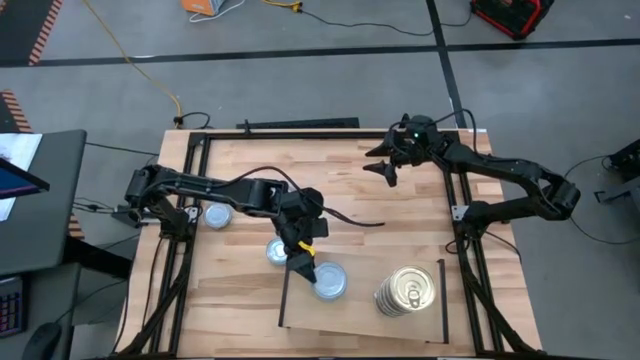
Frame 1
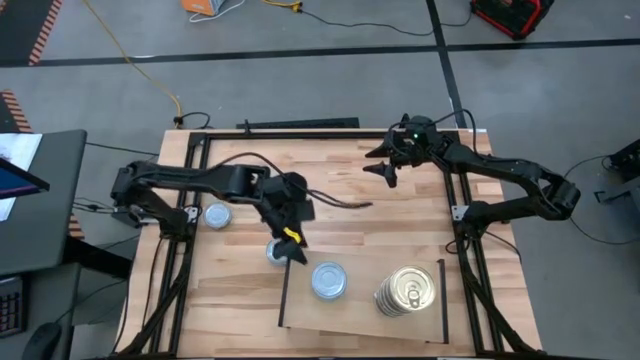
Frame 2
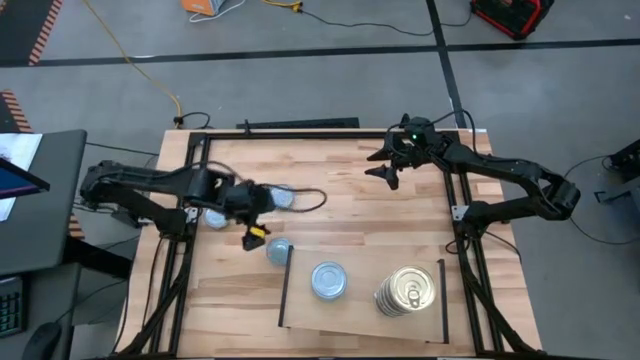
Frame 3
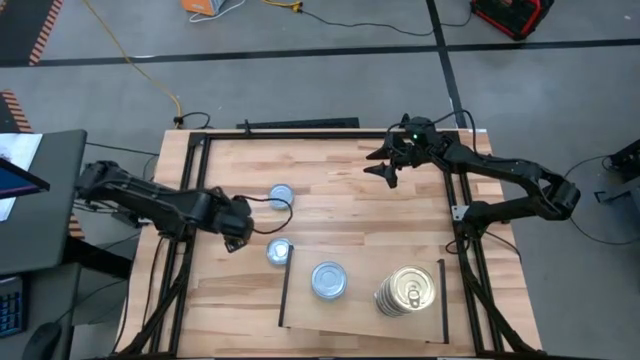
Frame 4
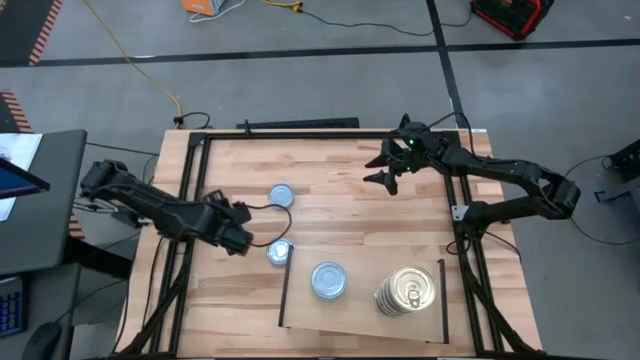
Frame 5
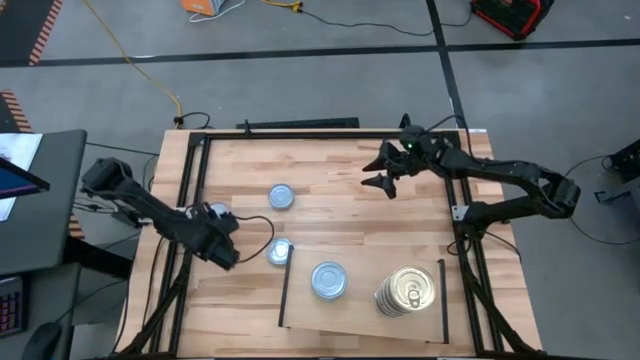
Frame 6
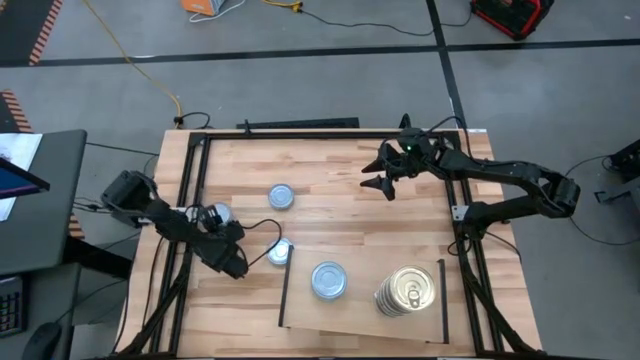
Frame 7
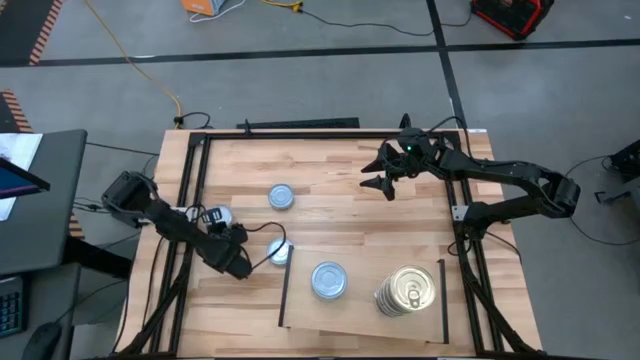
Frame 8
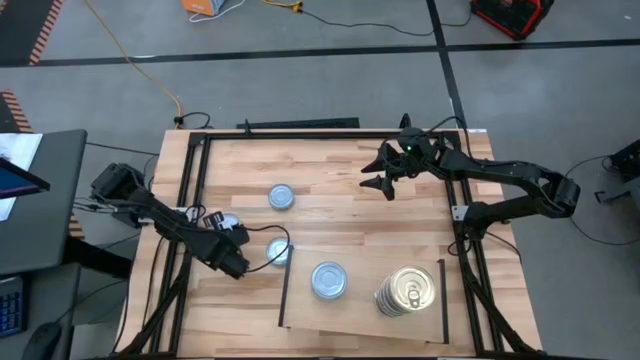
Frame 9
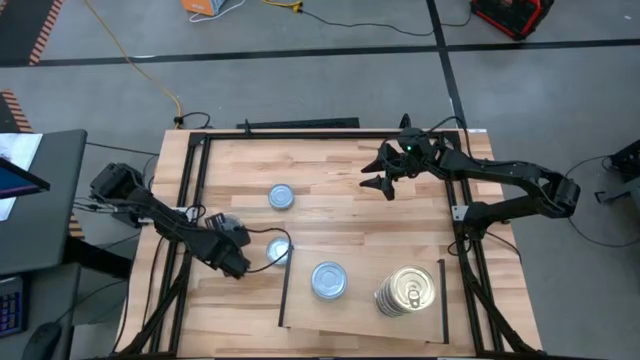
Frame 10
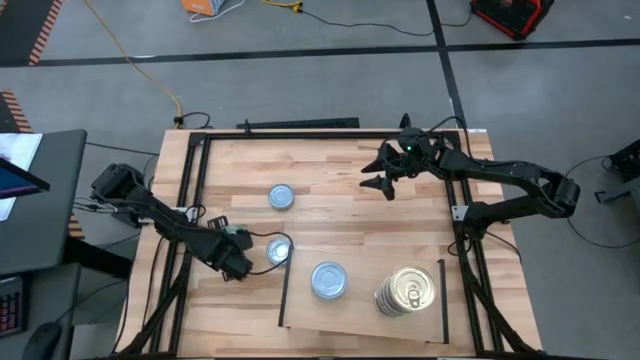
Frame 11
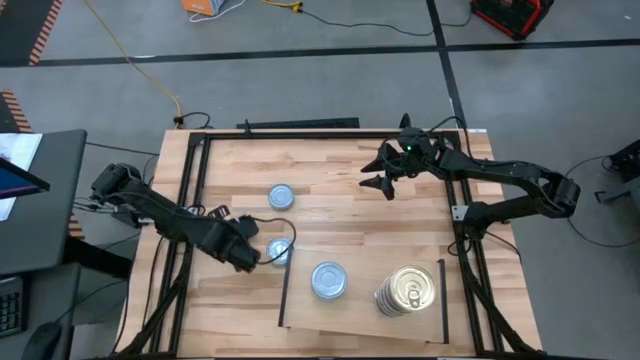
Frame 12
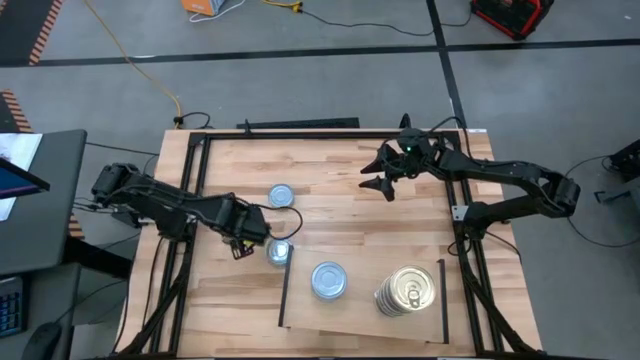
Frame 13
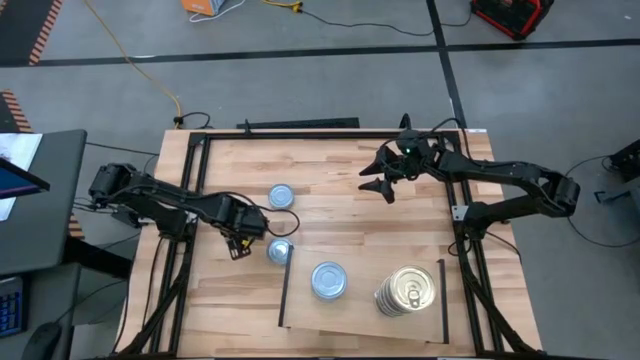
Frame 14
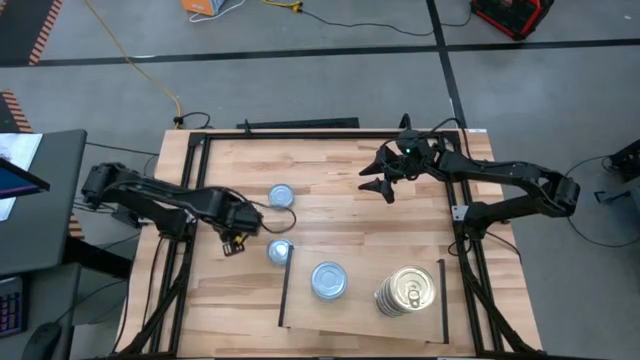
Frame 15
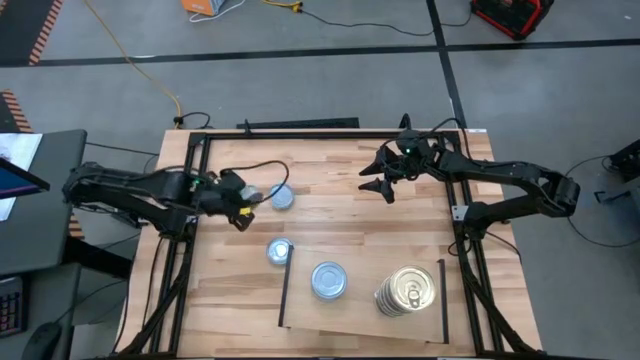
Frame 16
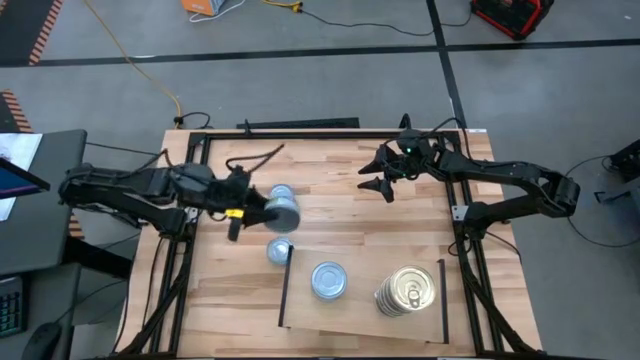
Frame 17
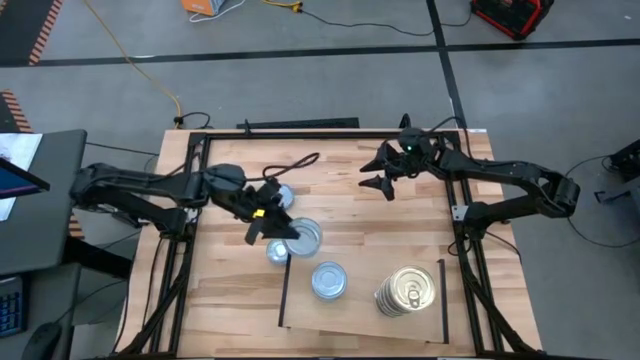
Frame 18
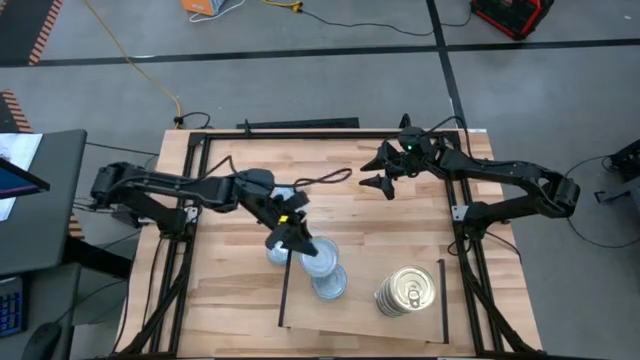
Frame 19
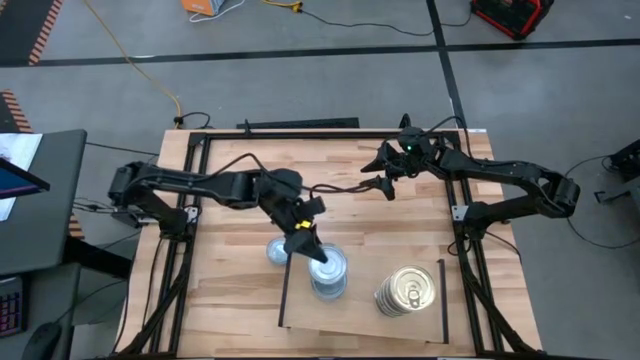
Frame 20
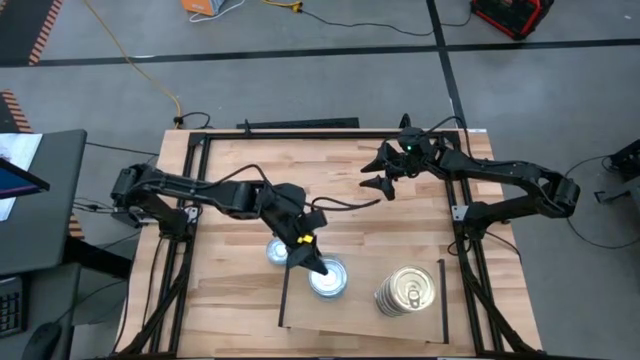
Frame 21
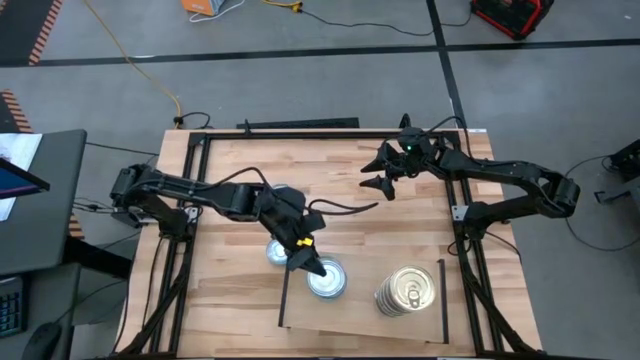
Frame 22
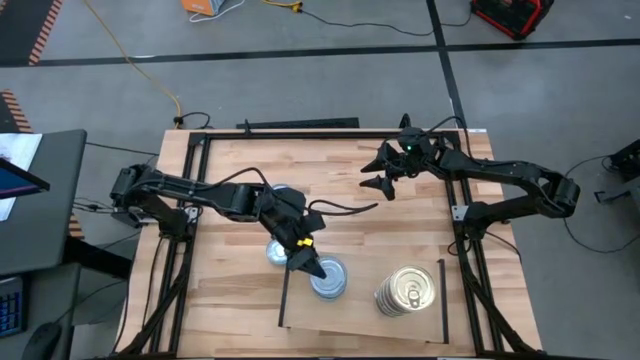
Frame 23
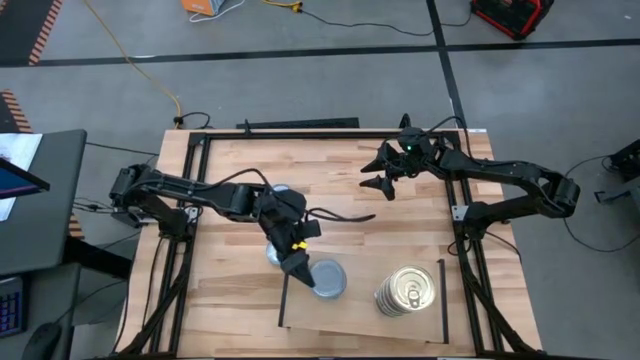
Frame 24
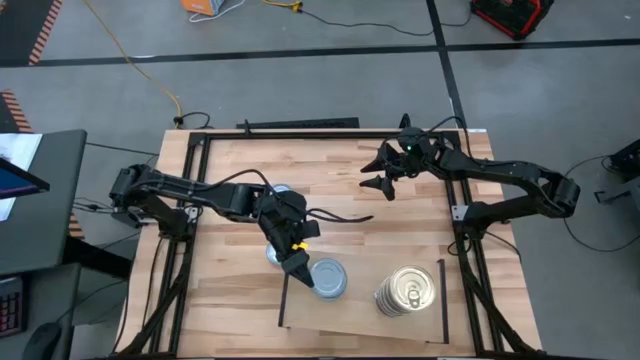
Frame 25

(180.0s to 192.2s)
Task: Stack canned seafood by type on shelf
Stack the green tuna can on the top of the green tuna cans on the shelf

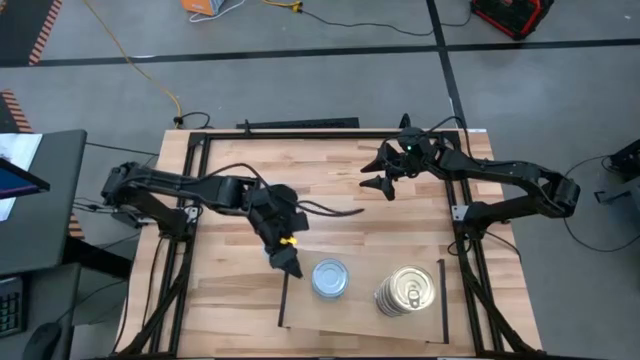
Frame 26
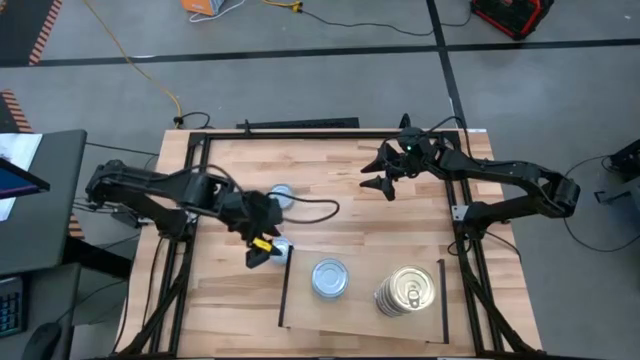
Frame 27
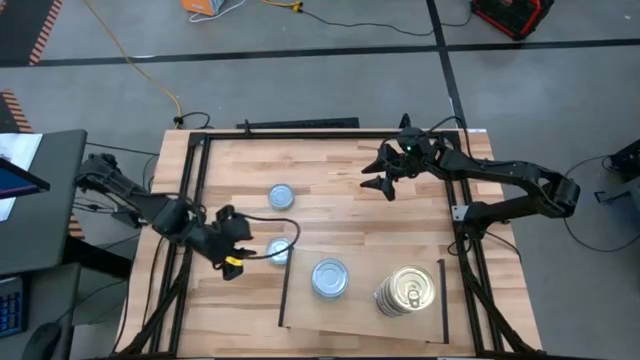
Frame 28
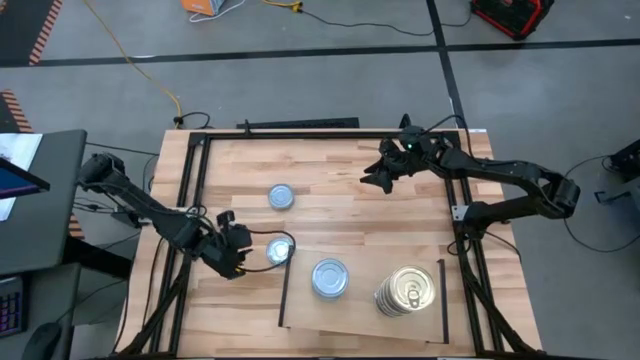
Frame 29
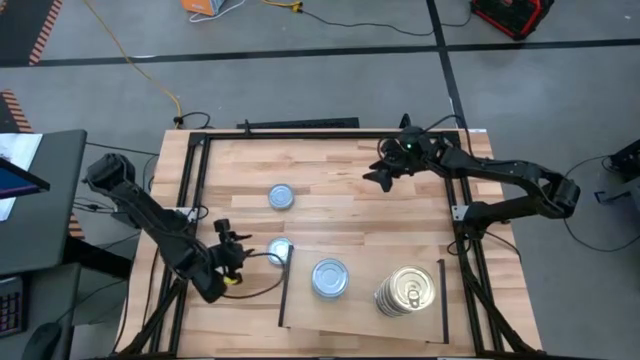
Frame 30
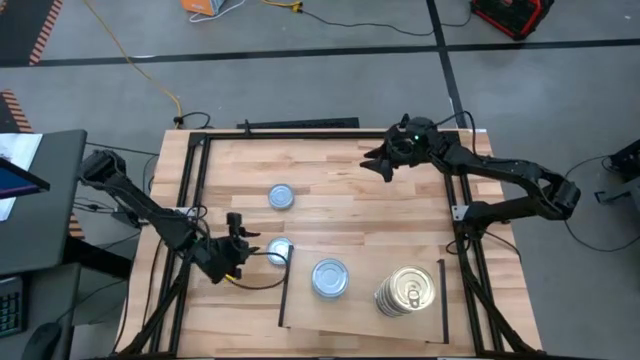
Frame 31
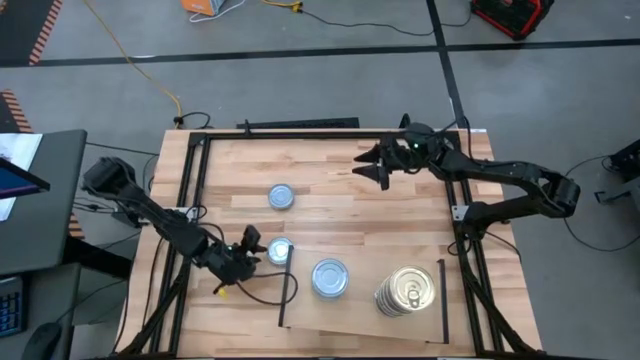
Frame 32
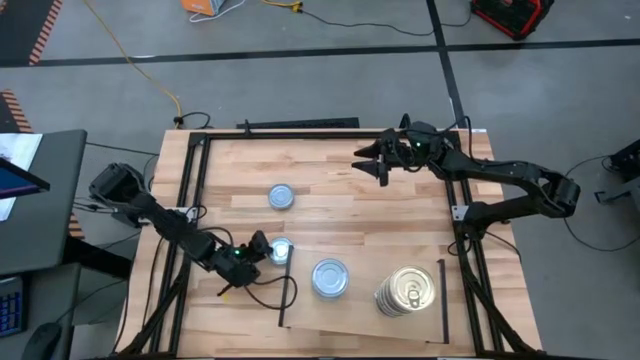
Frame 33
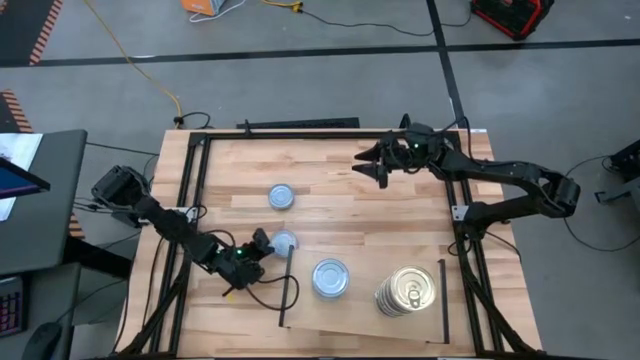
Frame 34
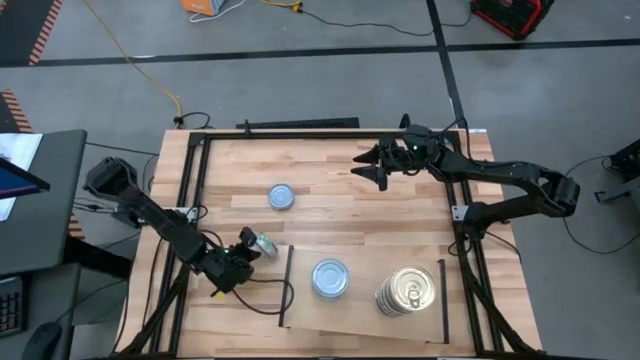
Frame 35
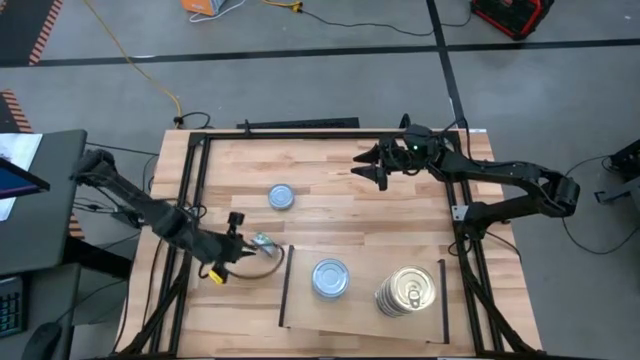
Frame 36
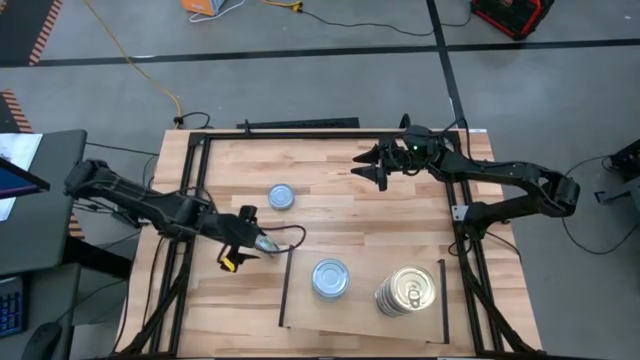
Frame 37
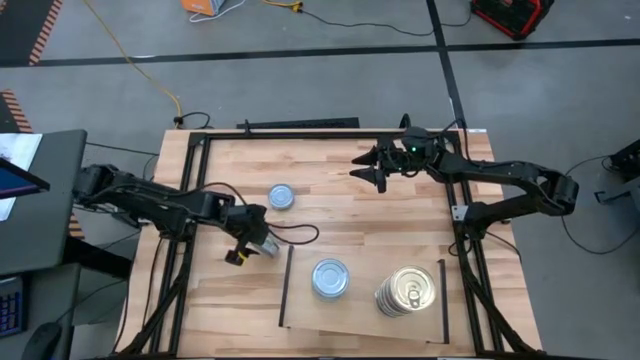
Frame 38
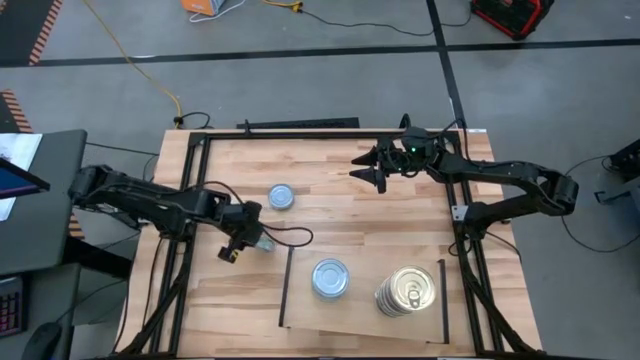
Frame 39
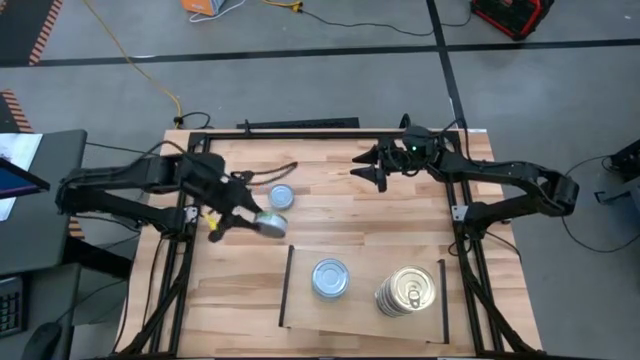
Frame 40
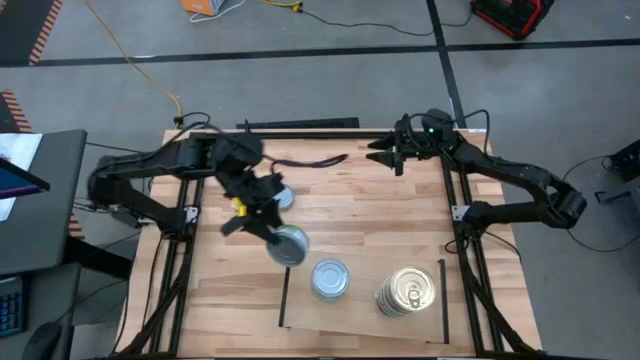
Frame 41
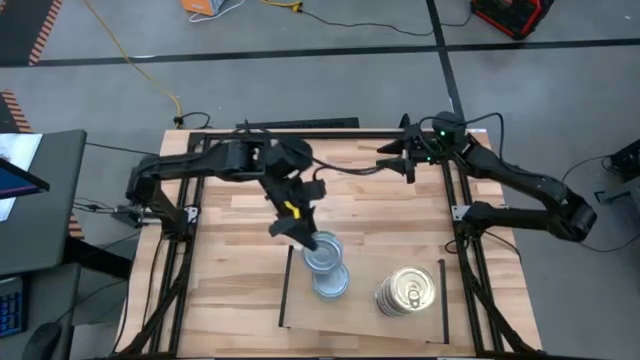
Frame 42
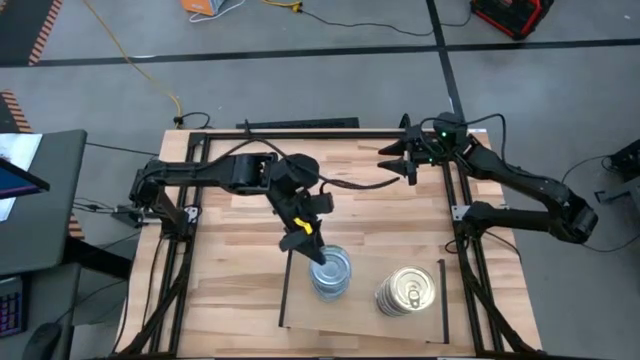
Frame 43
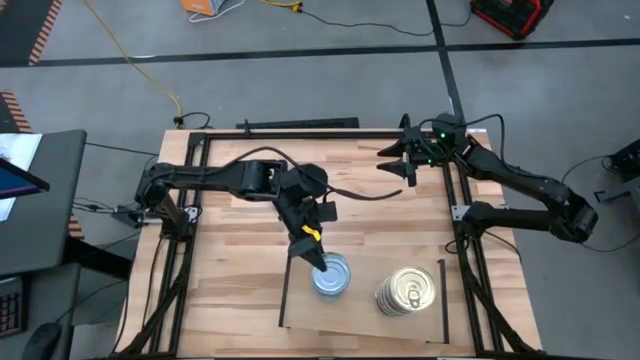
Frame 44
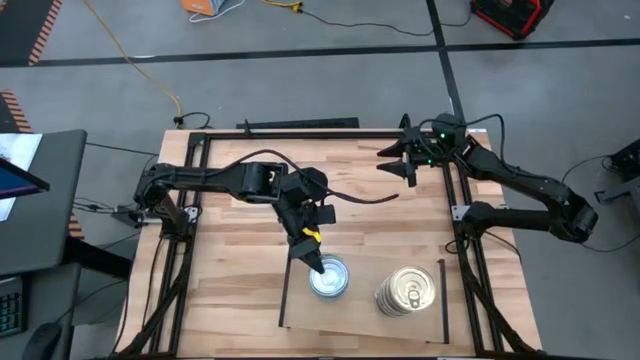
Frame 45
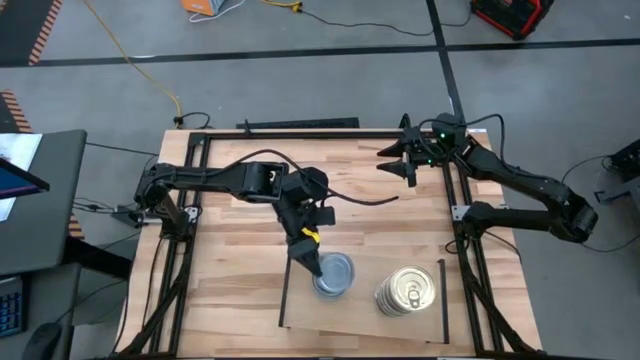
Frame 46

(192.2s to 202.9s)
Stack the green tuna can on the top of the green tuna cans on the shelf
